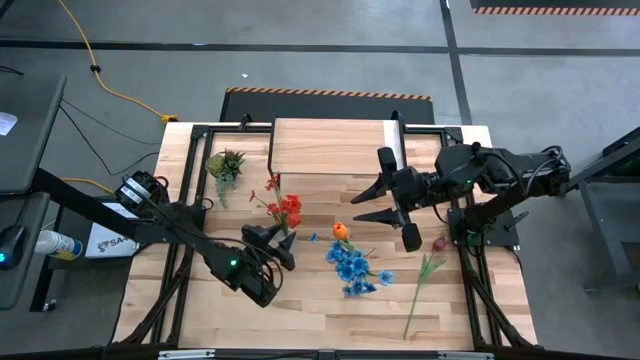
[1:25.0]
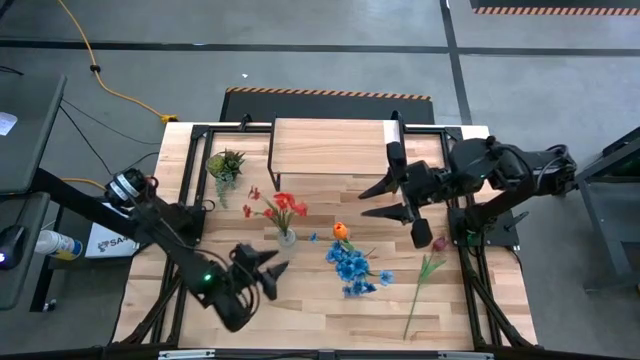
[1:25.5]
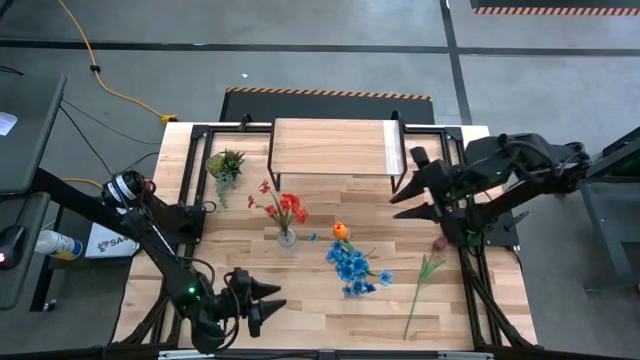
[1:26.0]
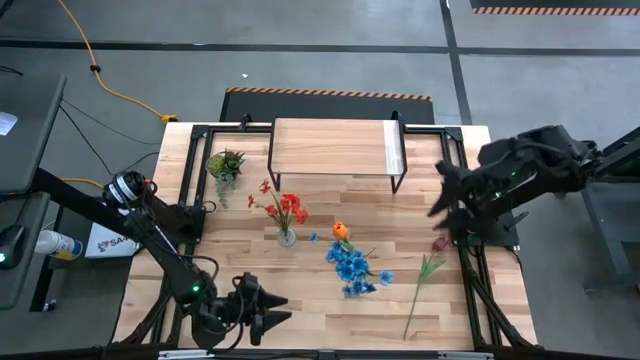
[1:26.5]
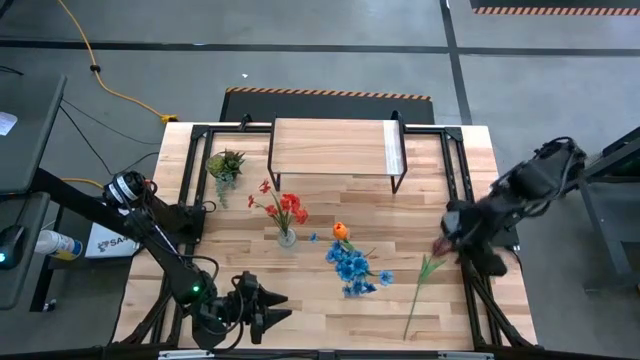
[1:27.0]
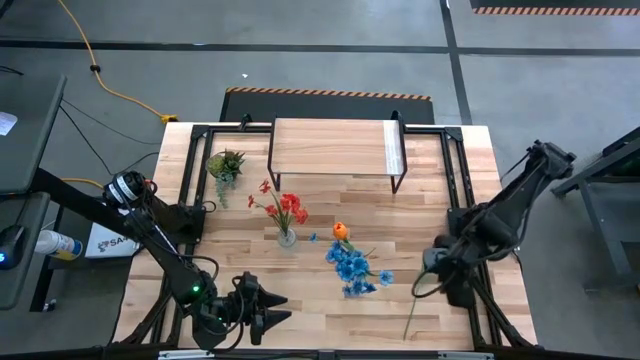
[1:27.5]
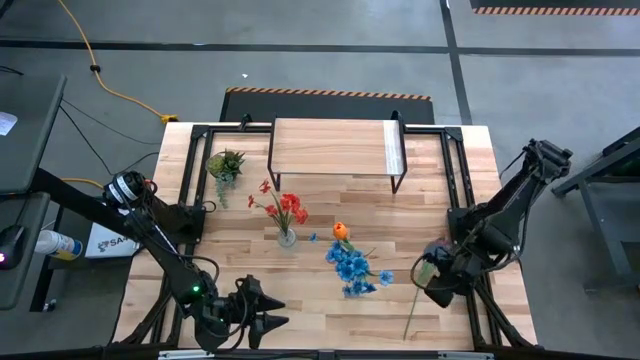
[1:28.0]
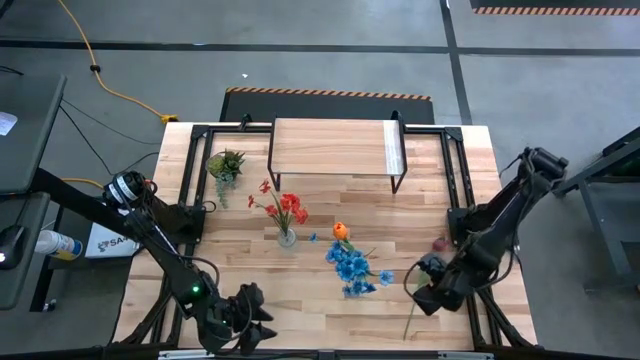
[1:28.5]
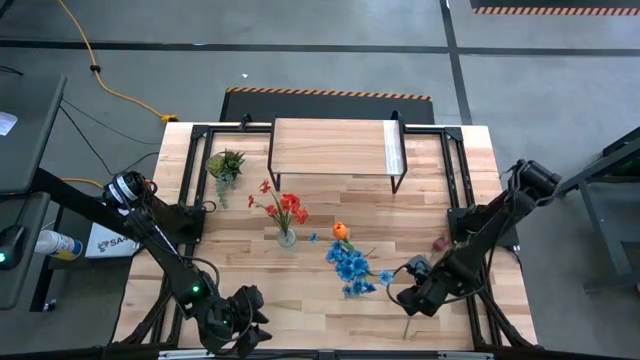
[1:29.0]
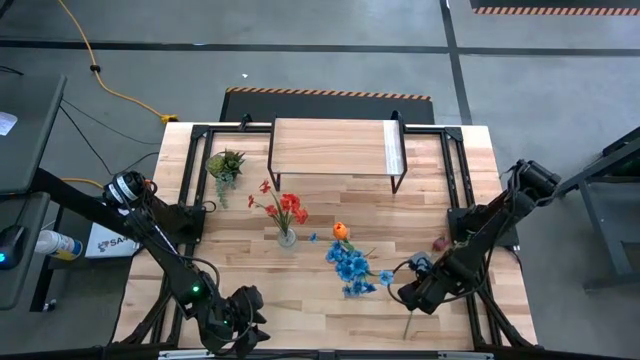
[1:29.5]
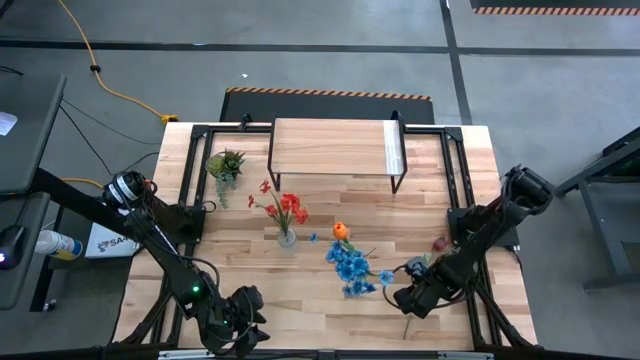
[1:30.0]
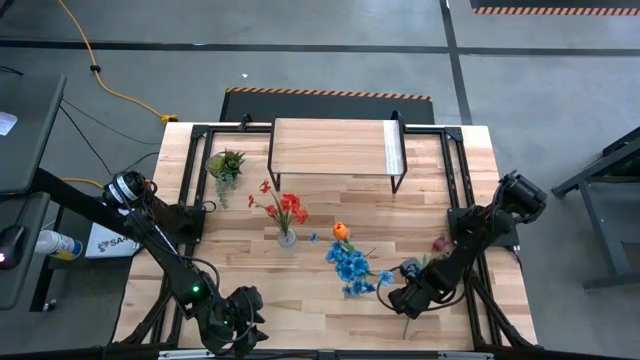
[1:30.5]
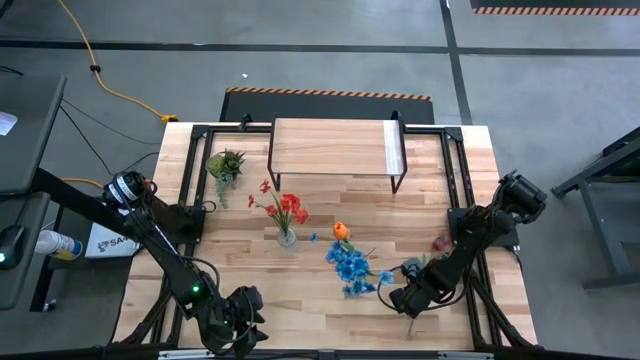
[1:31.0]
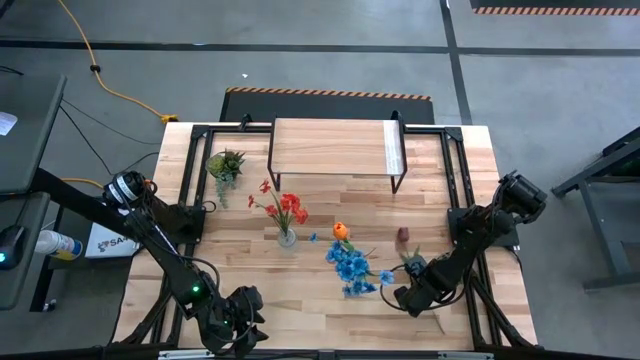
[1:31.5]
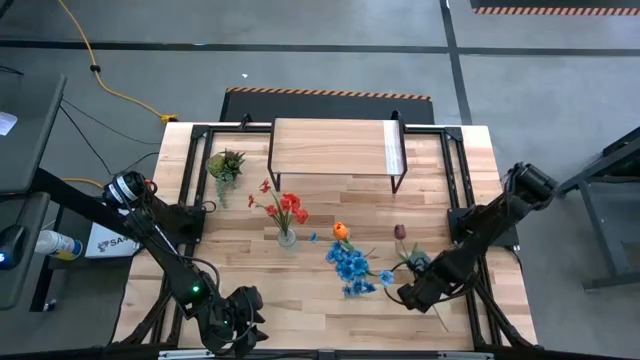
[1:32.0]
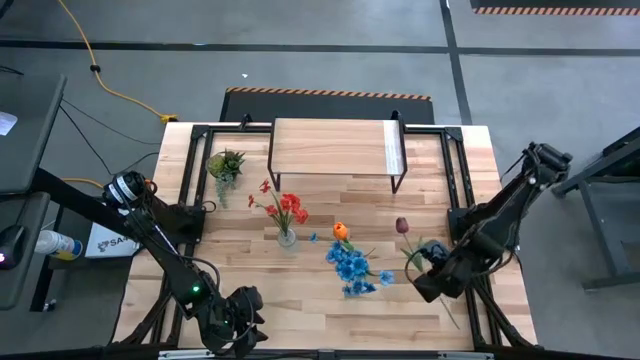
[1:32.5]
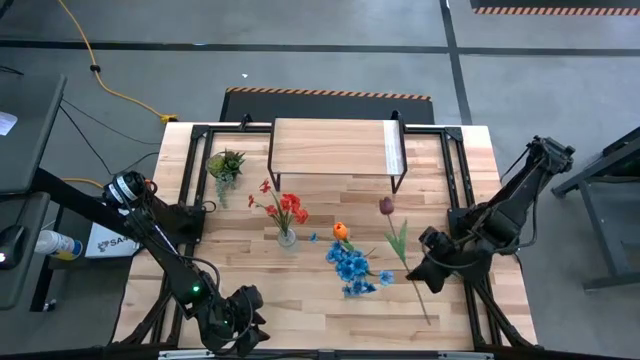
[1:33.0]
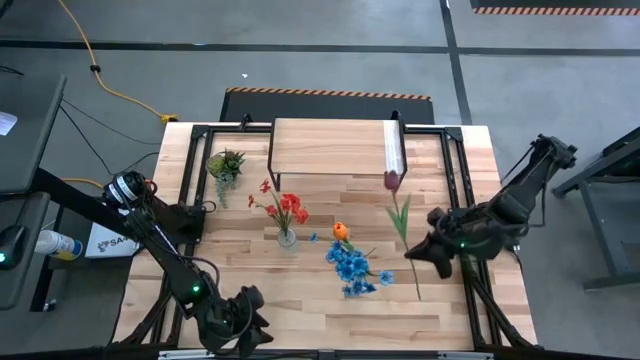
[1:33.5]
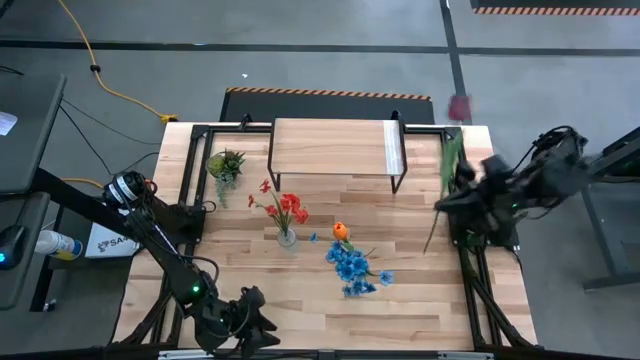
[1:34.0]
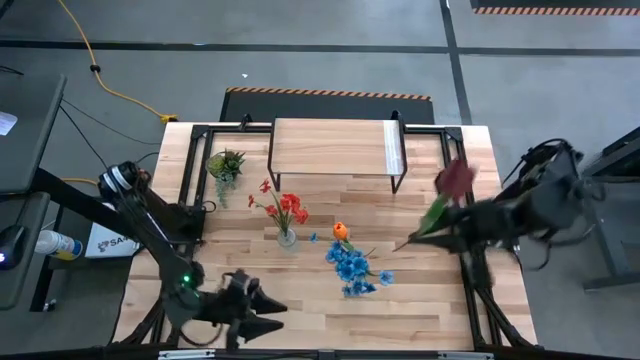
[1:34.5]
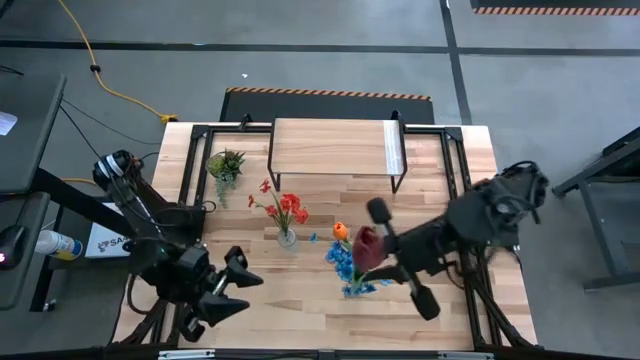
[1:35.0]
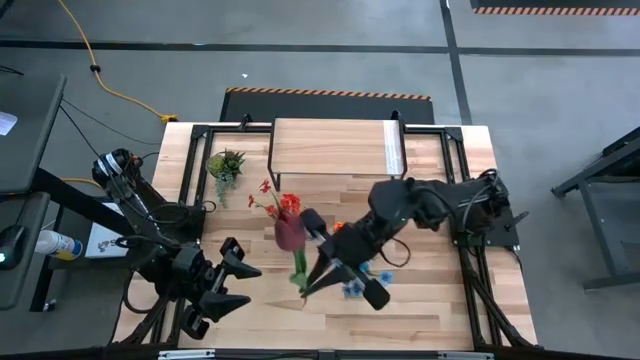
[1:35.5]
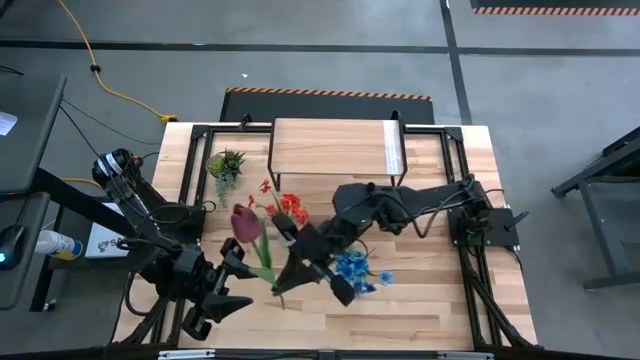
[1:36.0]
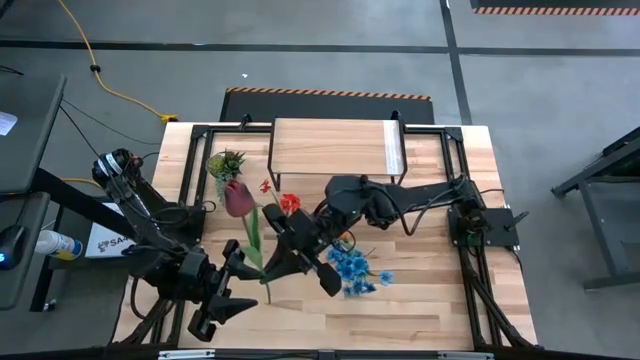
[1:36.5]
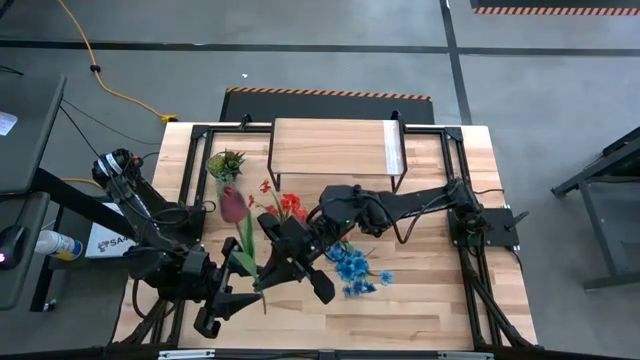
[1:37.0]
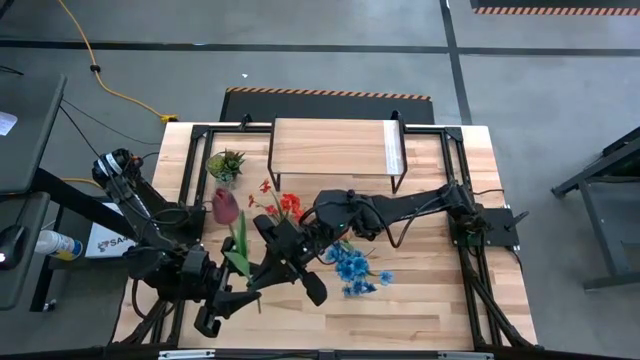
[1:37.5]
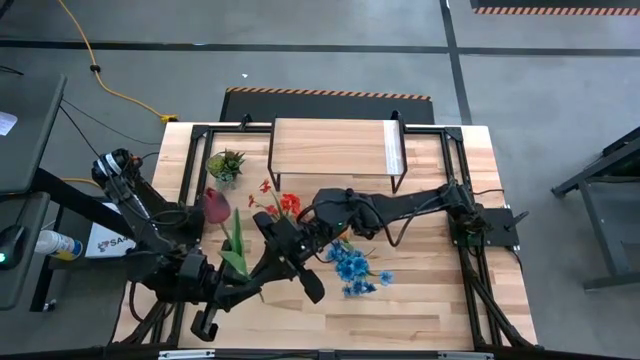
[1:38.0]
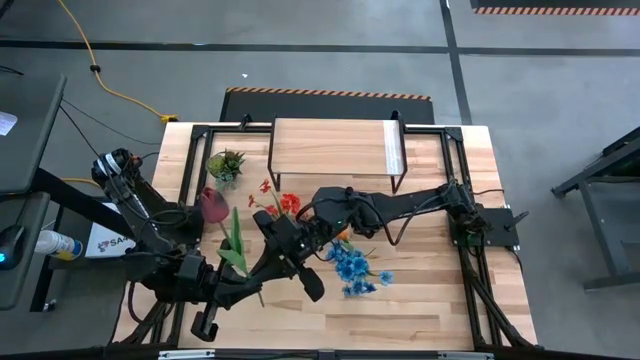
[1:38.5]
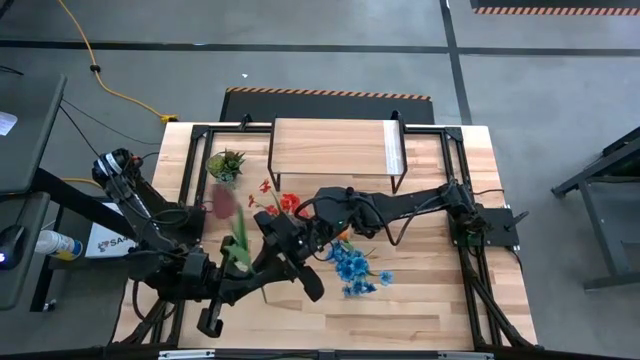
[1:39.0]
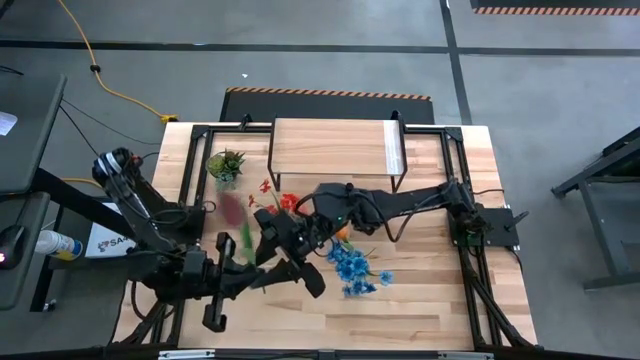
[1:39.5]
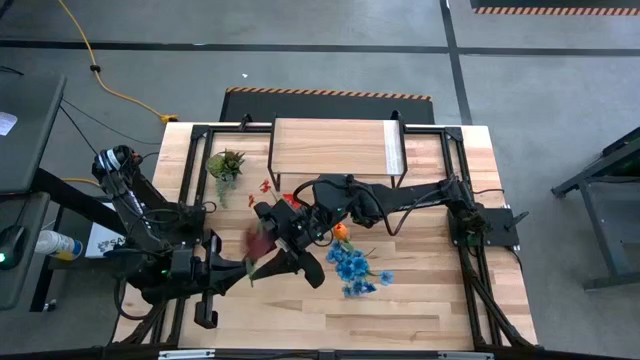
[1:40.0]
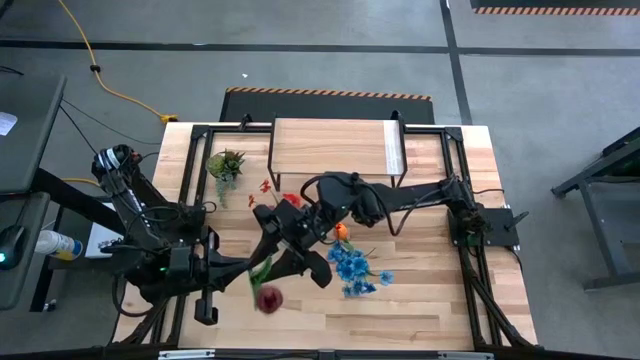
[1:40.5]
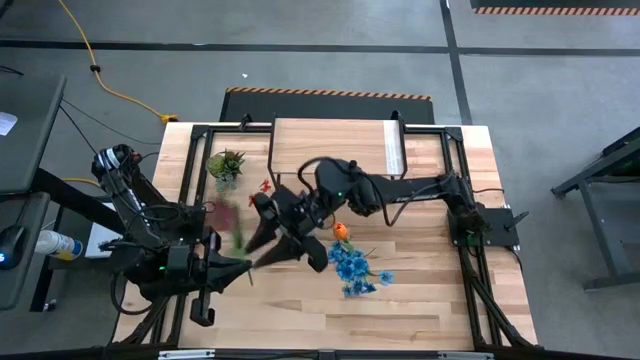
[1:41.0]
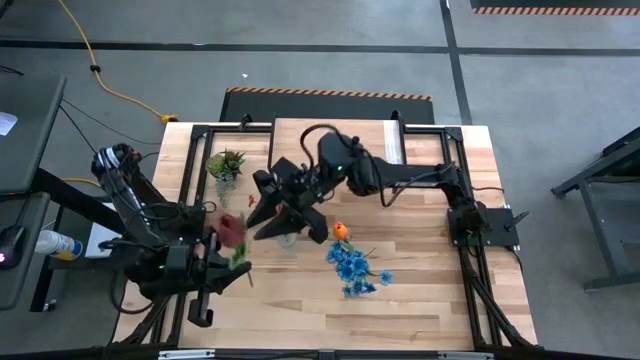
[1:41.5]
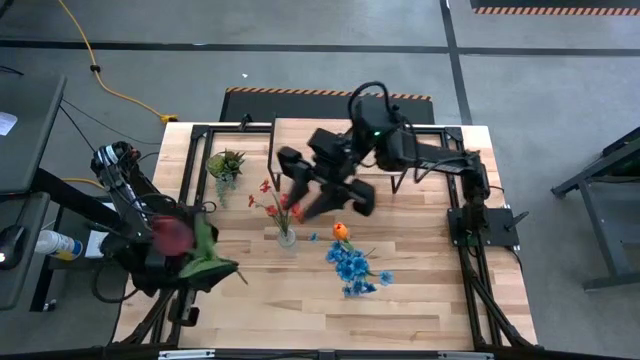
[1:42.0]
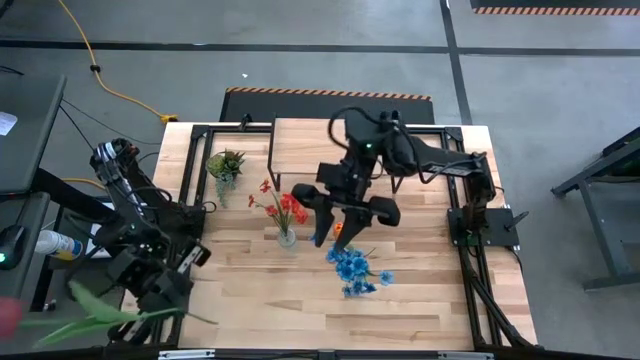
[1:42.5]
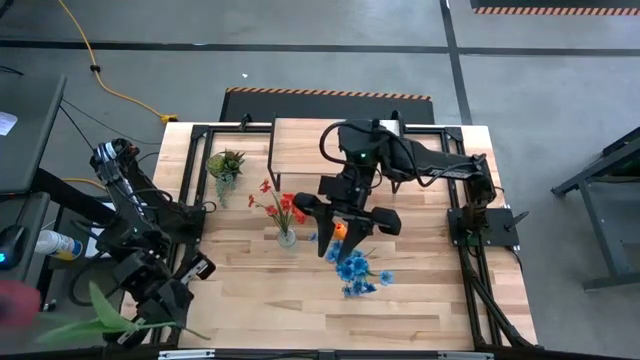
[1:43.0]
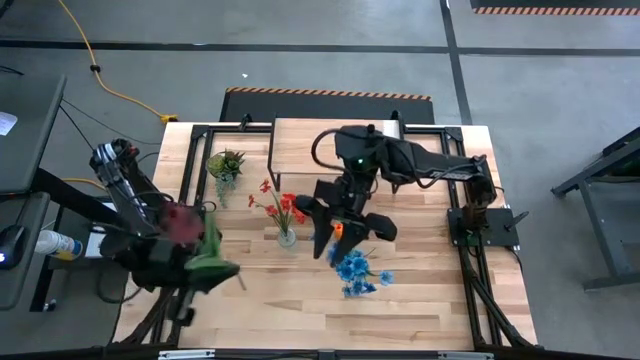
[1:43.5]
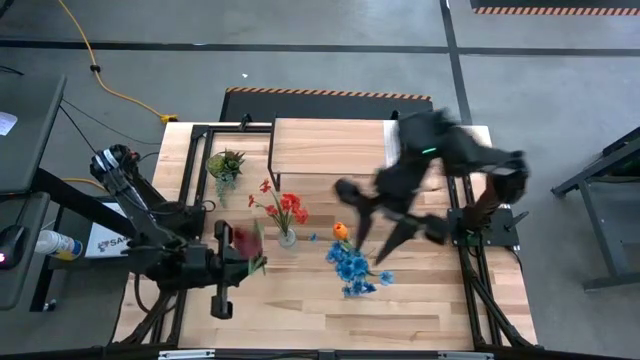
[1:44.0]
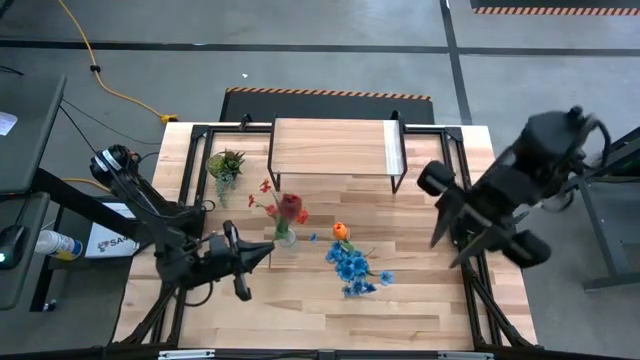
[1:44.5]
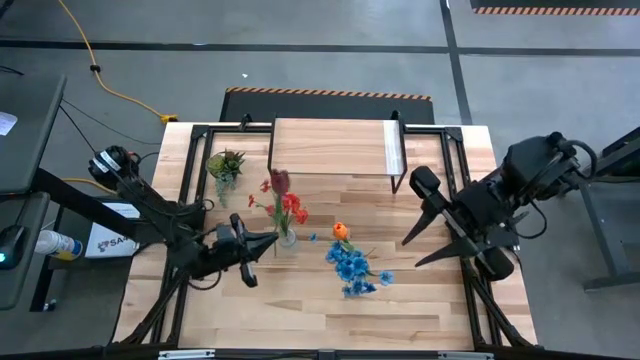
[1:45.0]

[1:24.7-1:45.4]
Task: Pick and place flowers into a vace then onto a shelf
Put the dark red flower into the left transparent vase
